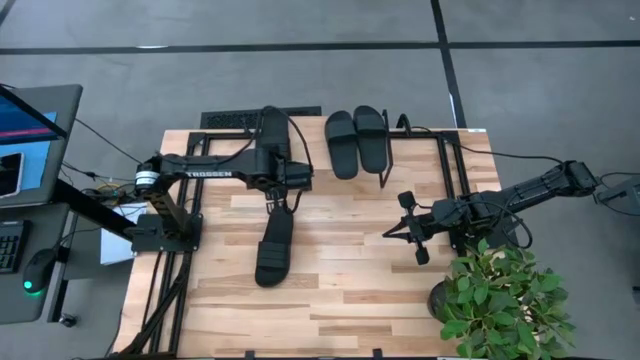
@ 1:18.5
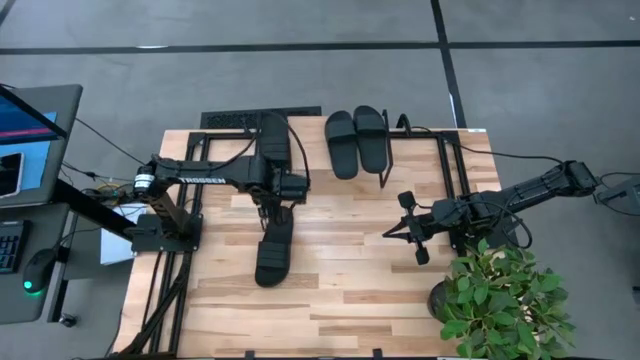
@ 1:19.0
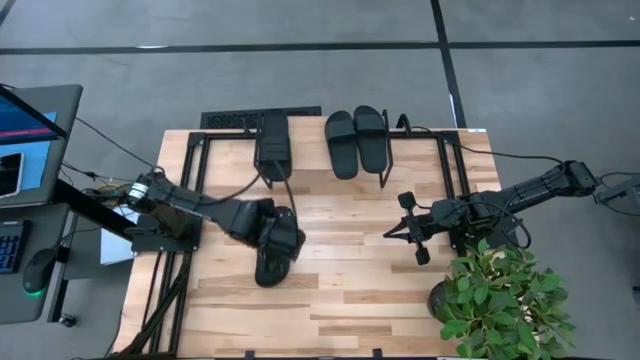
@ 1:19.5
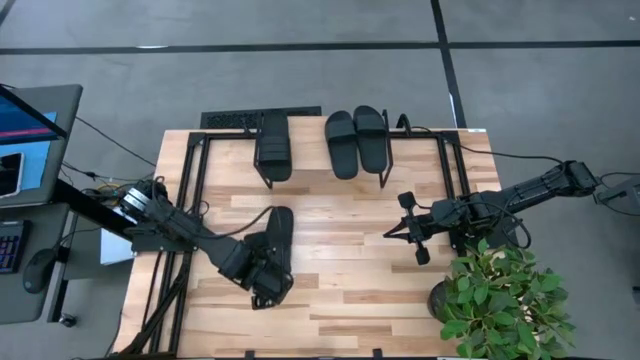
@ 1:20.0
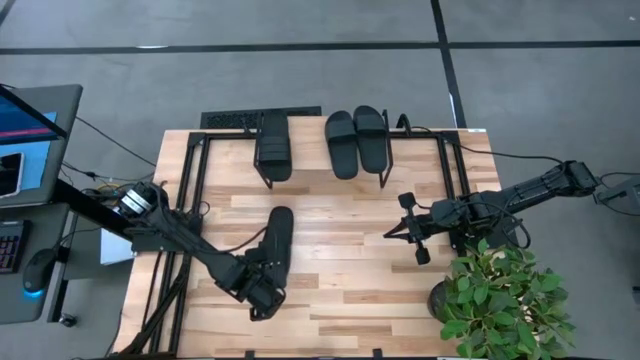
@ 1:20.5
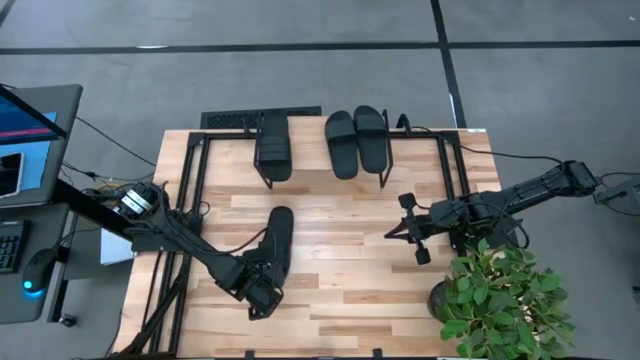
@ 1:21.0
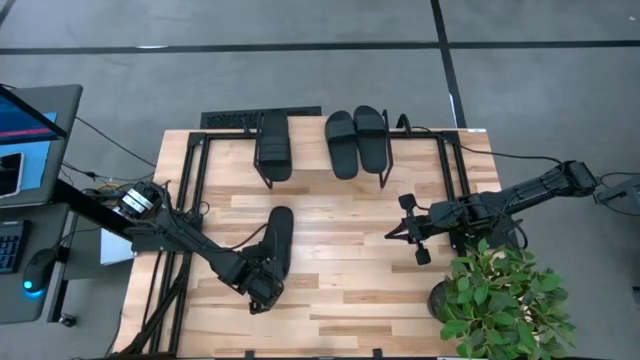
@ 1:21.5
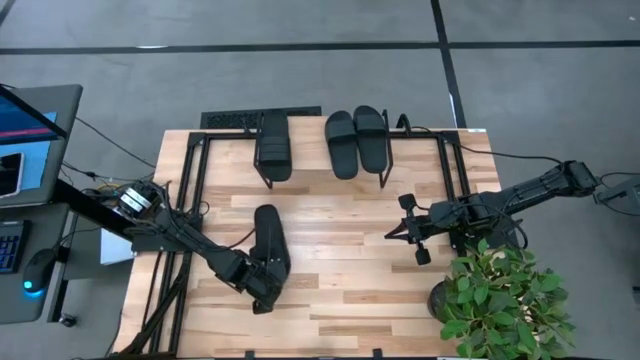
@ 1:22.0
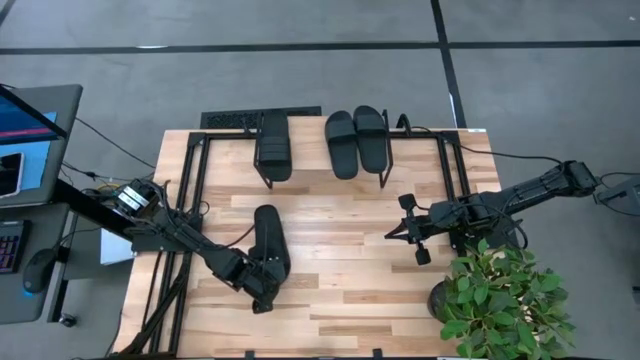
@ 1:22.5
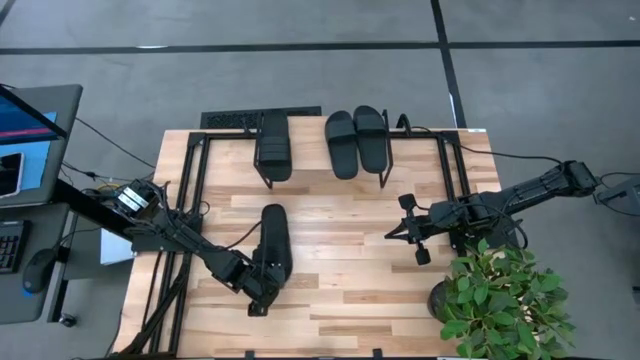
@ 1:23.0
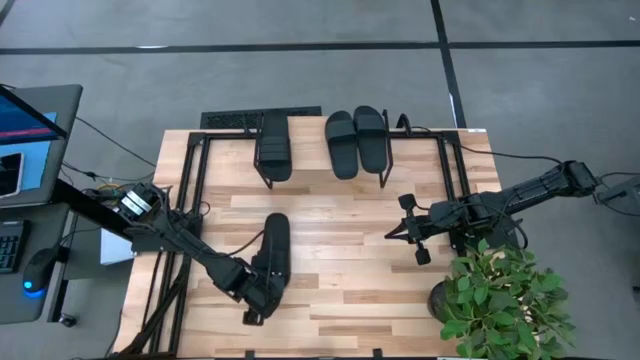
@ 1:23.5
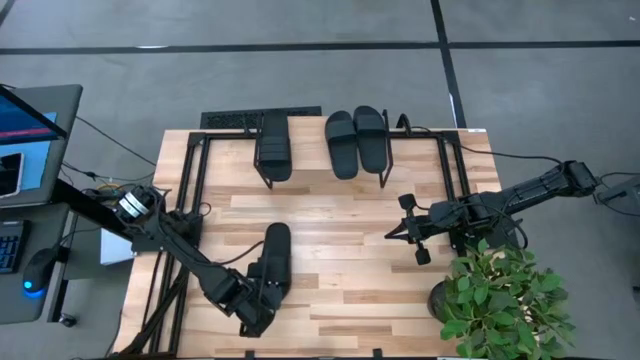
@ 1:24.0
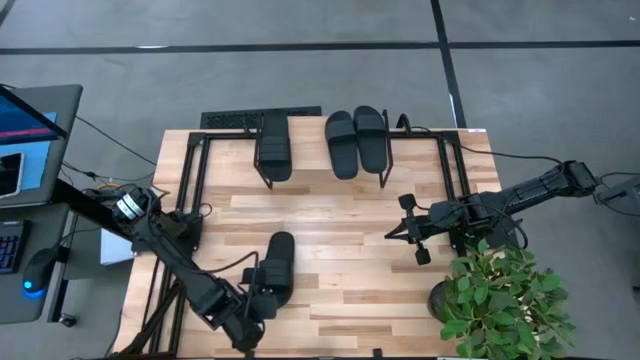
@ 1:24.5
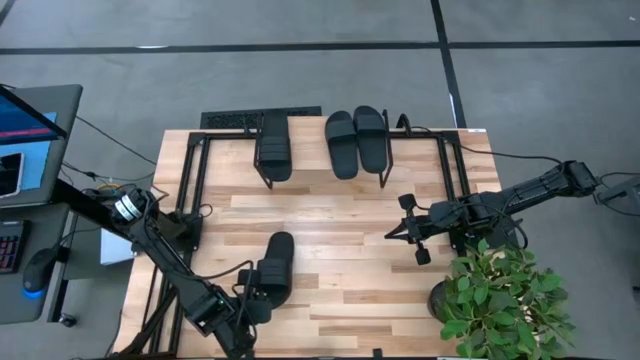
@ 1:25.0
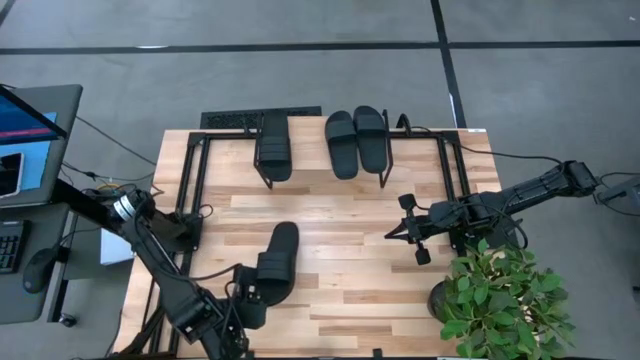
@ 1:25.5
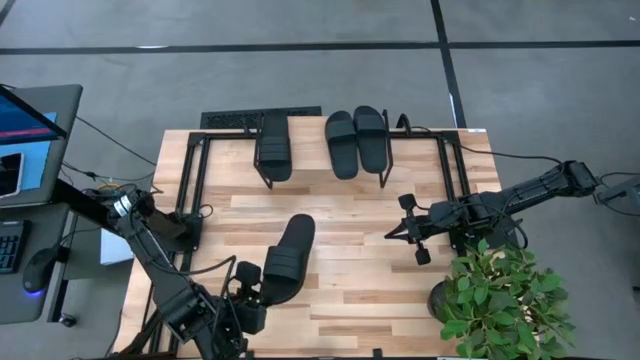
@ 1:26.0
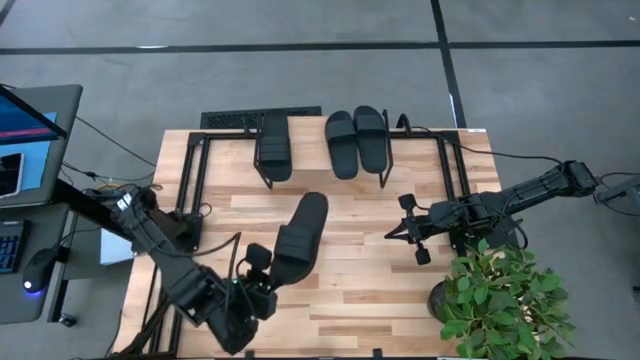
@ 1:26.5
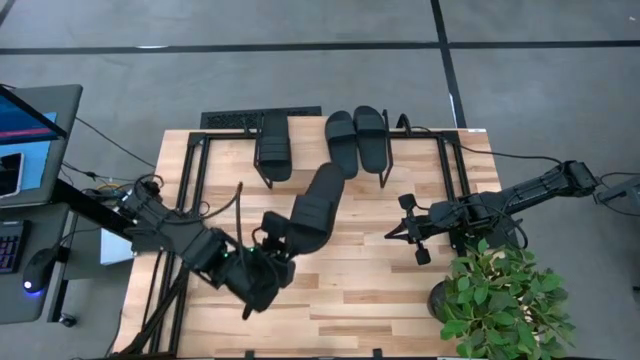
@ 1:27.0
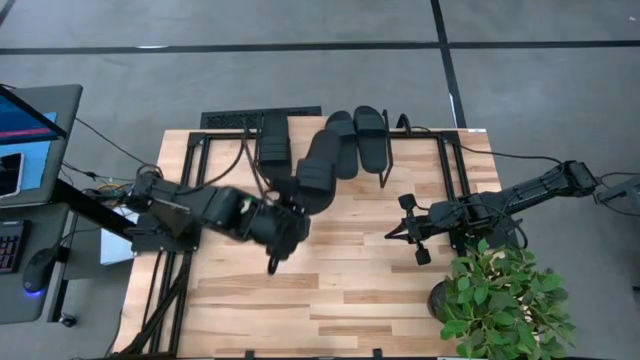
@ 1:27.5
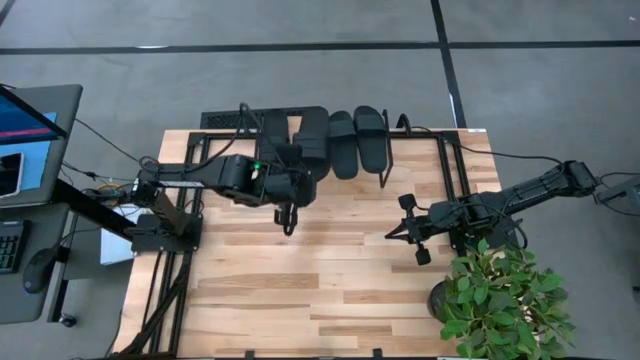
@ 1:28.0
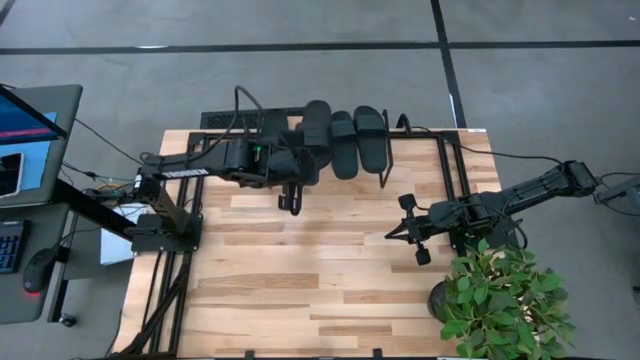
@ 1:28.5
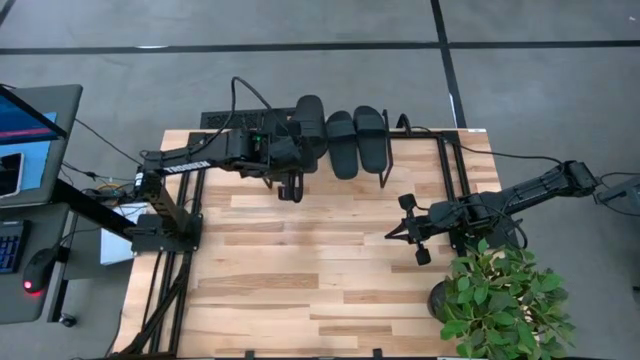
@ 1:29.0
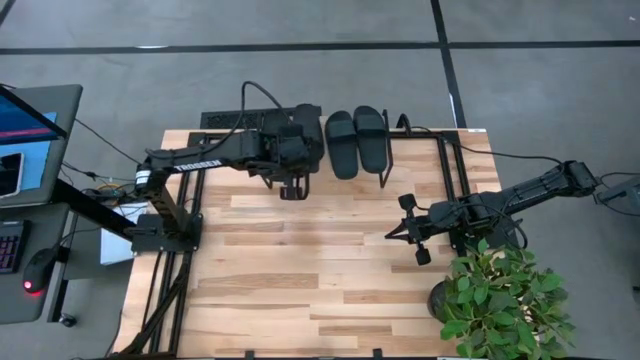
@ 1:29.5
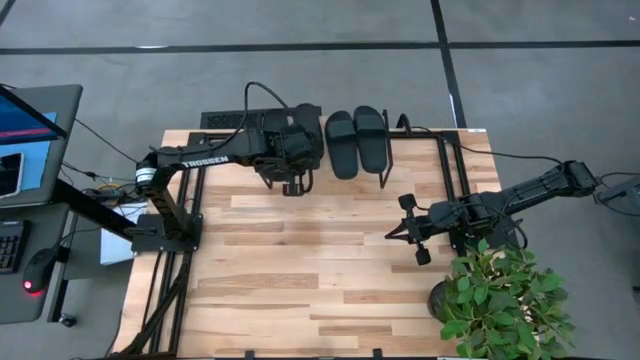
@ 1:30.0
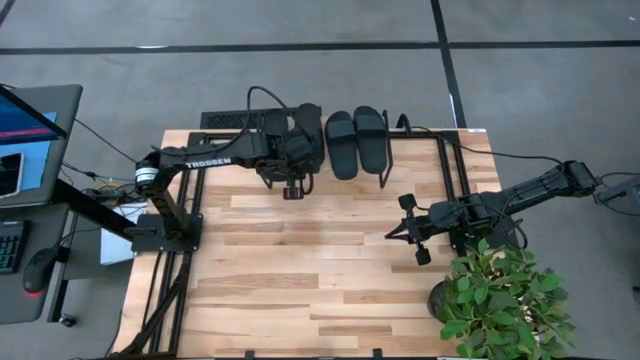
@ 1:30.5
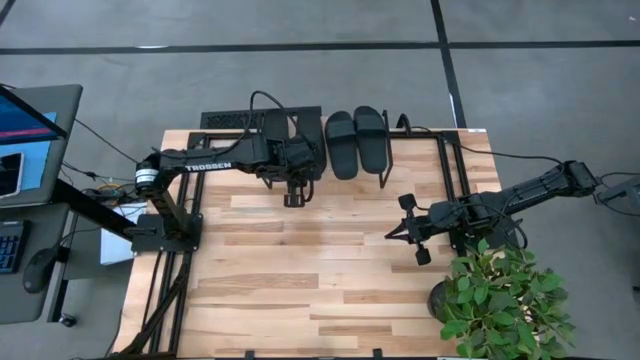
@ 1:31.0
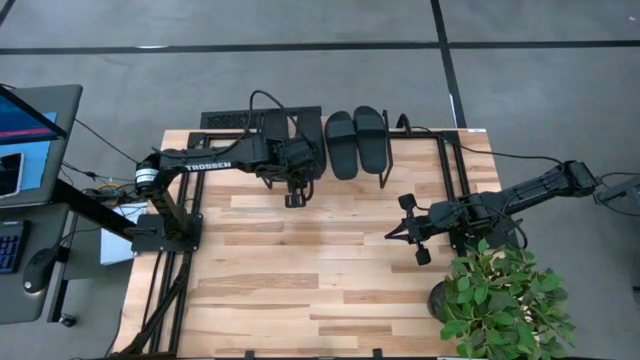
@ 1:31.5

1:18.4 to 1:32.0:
Task: Pick and place slides into the shelf
Put the black slide on the shelf

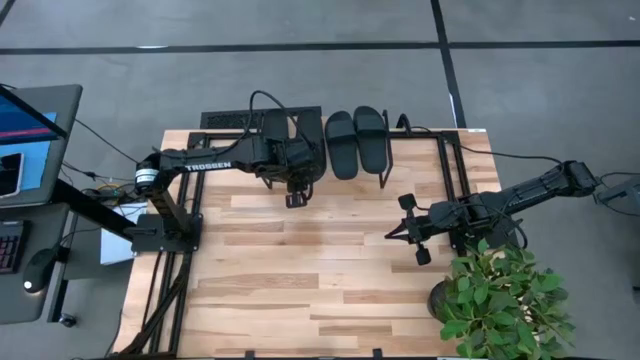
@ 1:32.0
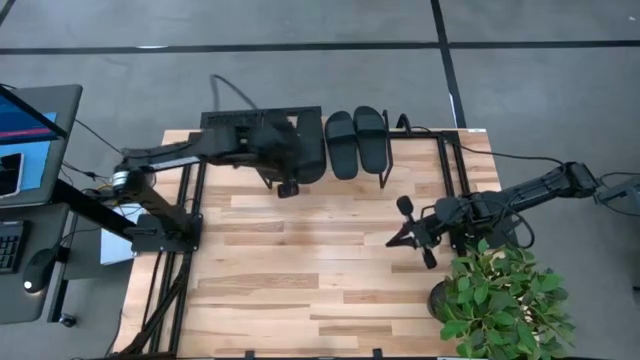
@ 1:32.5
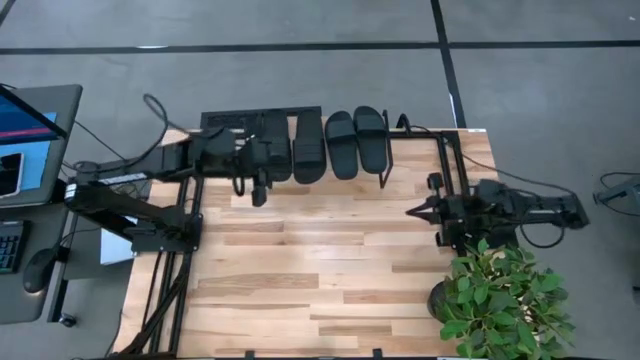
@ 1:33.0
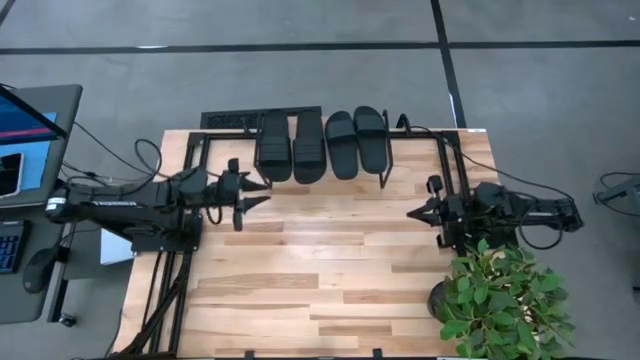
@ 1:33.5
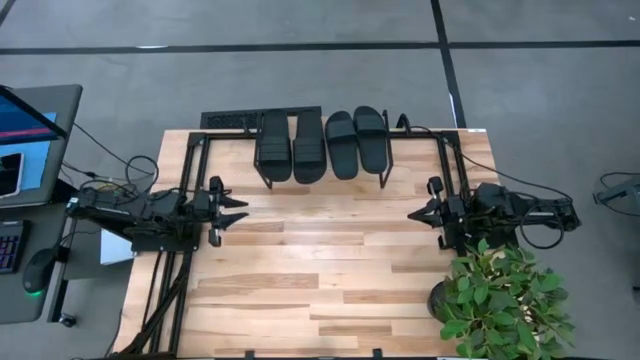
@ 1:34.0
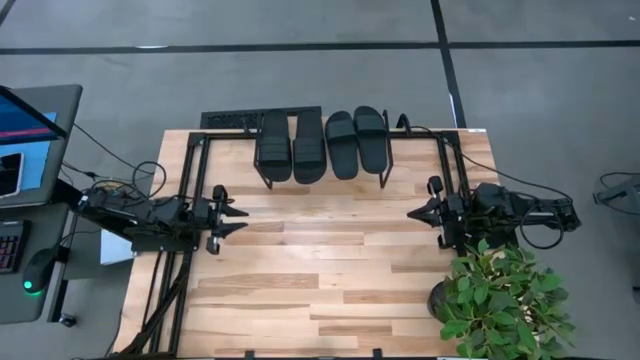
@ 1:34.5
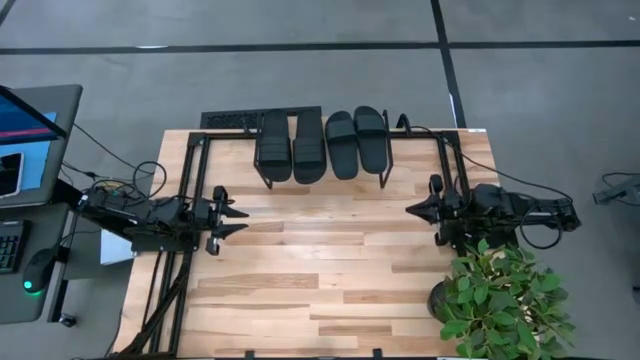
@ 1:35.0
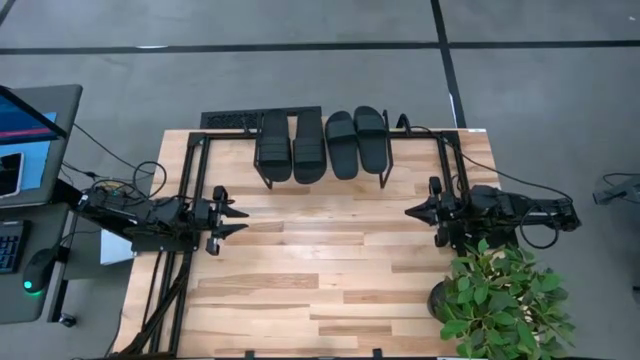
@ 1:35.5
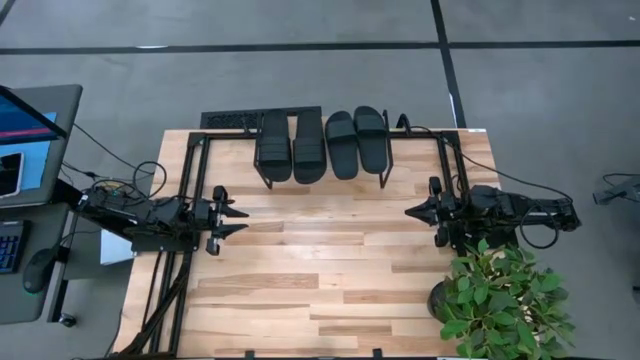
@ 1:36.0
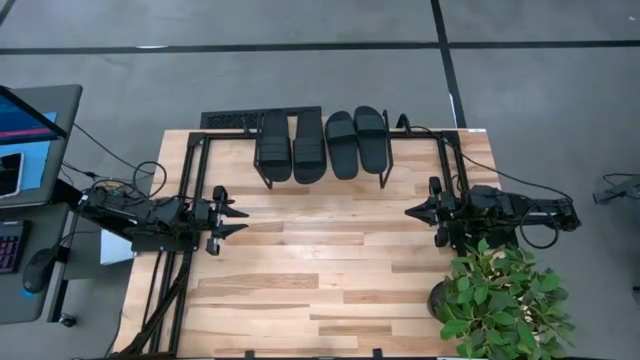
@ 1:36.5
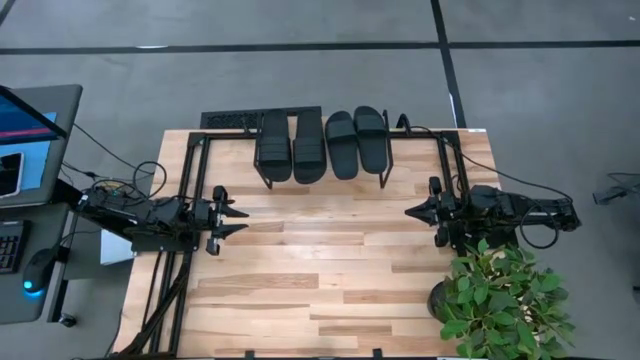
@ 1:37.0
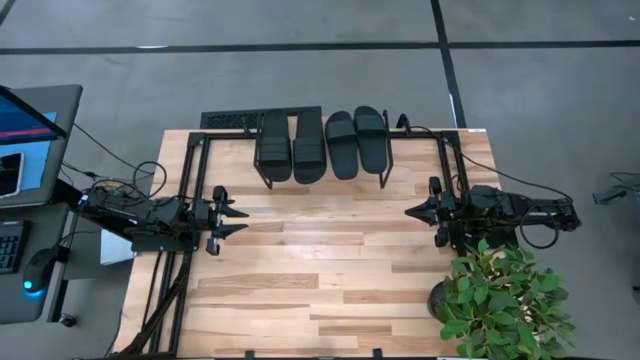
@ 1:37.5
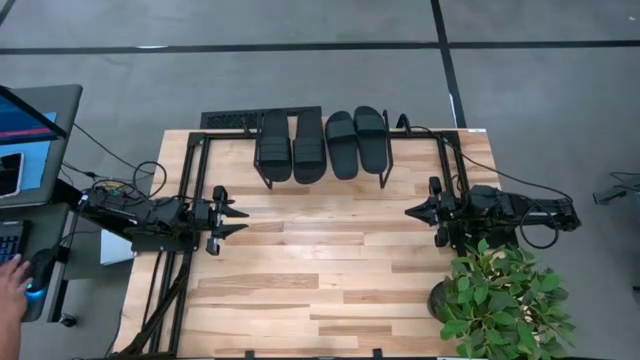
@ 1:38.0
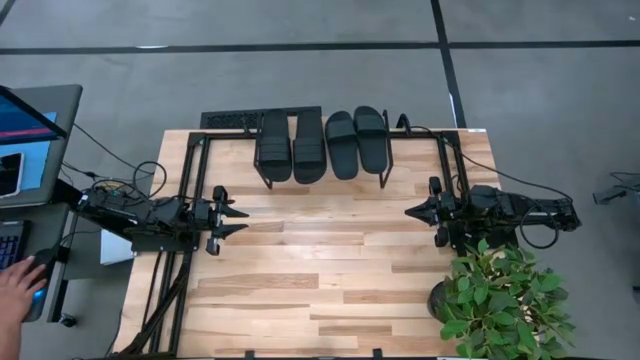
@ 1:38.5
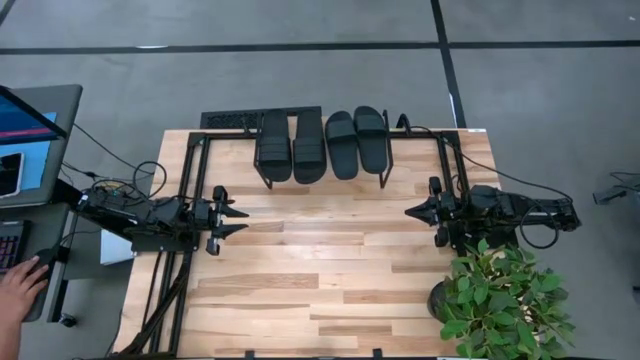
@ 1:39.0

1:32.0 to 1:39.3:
Return to Home Position

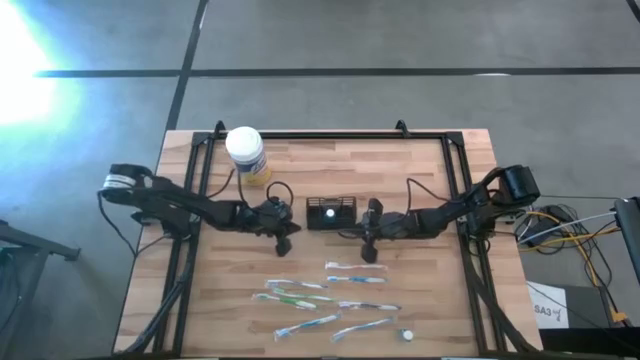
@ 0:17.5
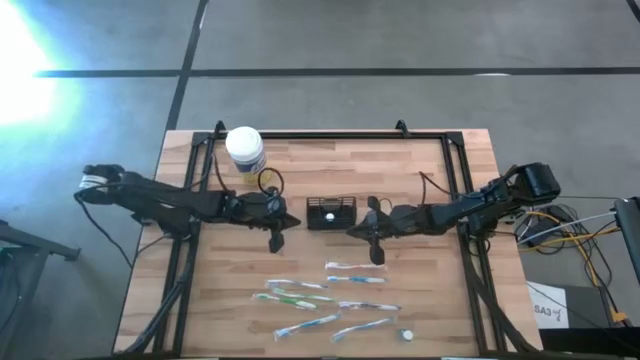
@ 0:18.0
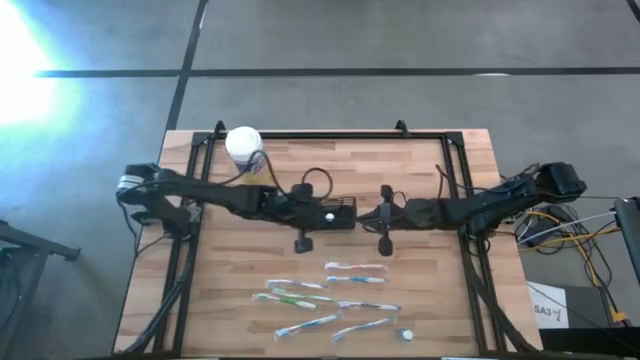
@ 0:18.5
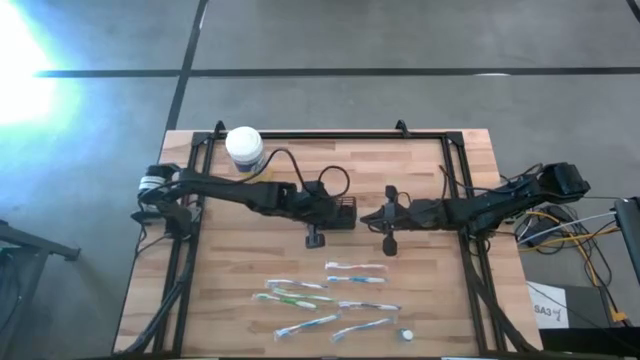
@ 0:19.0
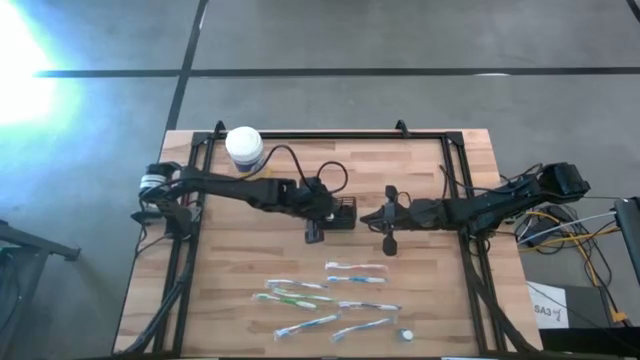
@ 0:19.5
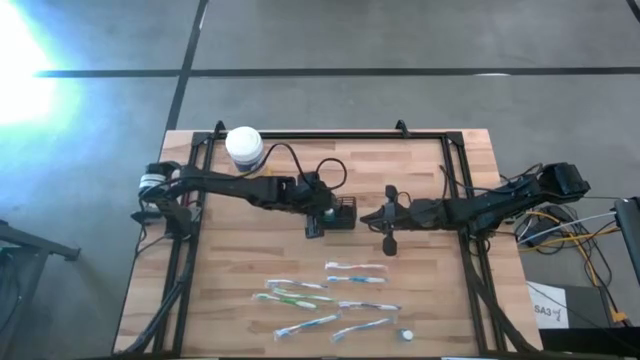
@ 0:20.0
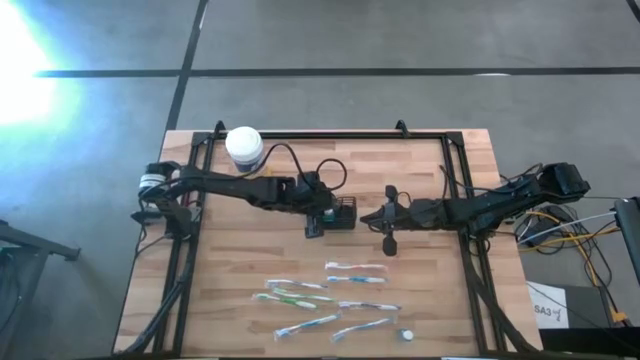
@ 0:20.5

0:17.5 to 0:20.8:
Task: Pick & Place toothbrushing station
Adjust the blue mouthwash
